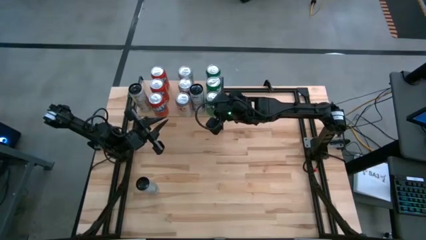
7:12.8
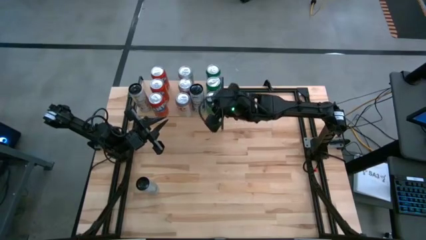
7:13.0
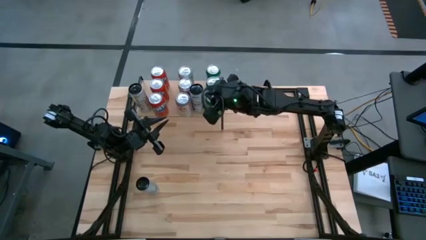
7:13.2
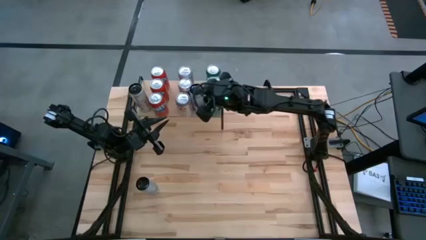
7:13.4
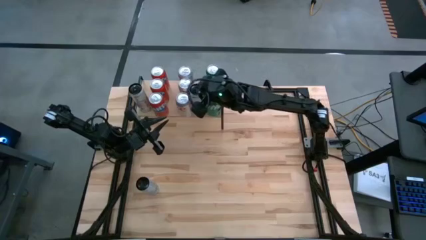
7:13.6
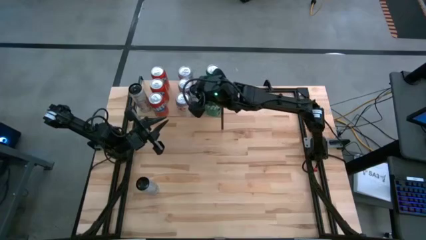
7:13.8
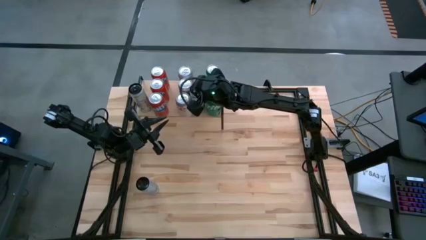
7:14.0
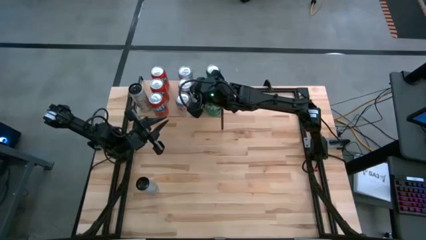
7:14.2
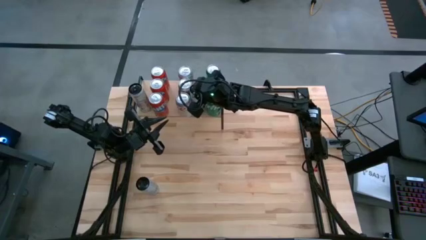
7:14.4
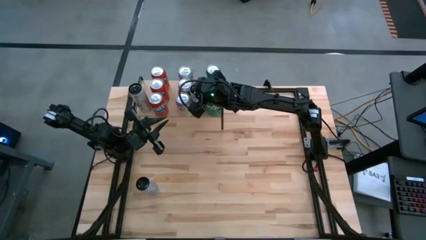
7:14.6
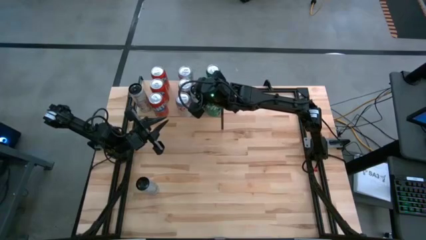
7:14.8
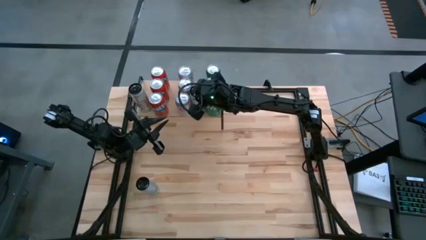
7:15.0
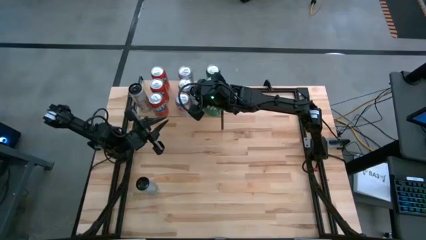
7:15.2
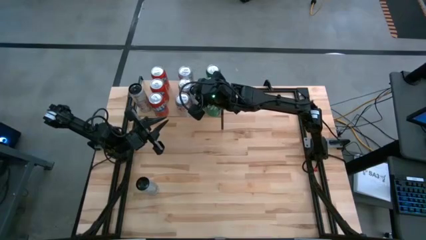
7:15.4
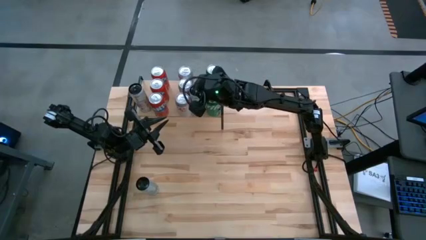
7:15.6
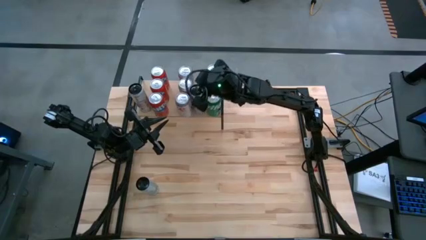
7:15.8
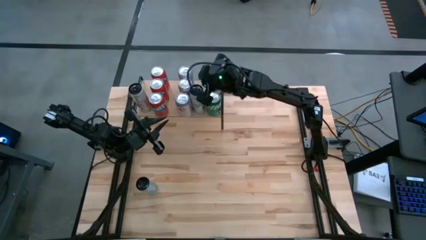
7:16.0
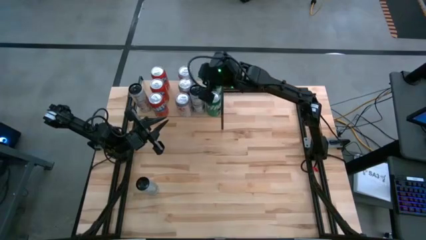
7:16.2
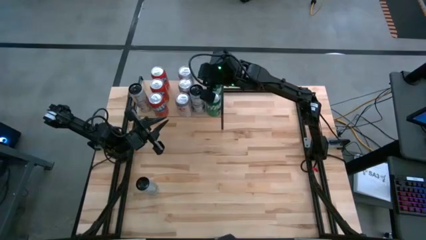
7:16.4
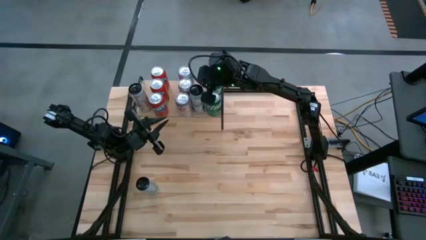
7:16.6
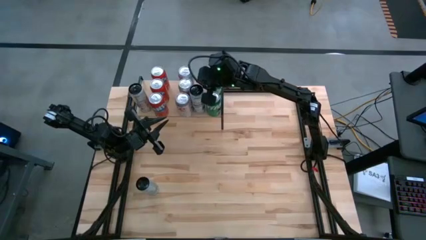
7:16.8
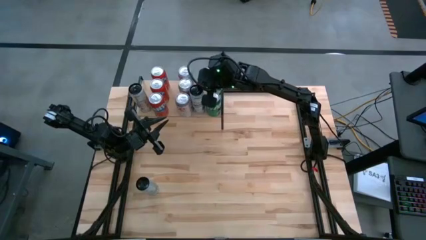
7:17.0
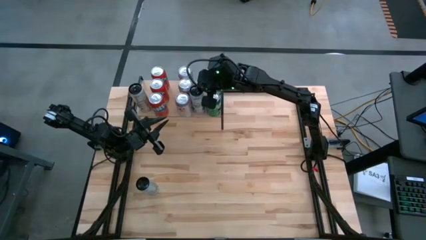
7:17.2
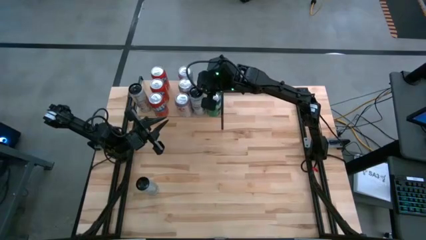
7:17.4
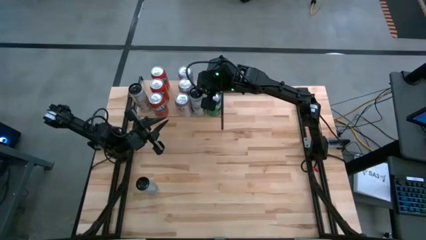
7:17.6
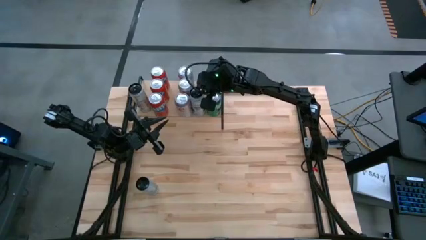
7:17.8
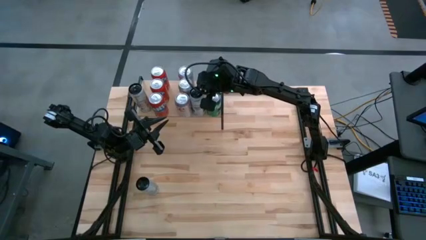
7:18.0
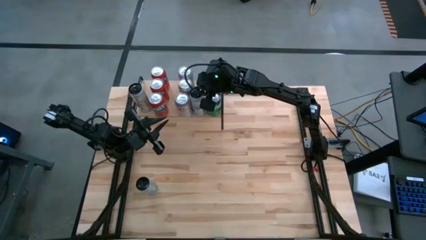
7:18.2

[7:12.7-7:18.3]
Task: Place canned beverage on shelf
Adjust the white and blue soda can on the shelf

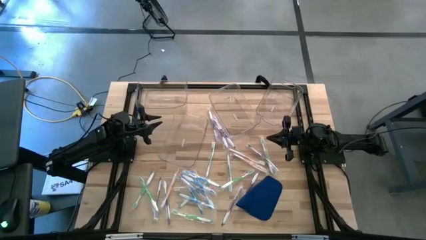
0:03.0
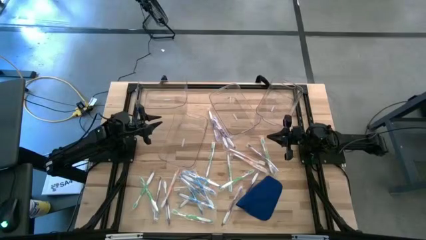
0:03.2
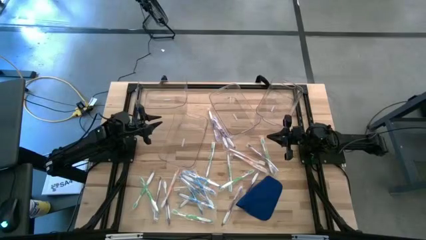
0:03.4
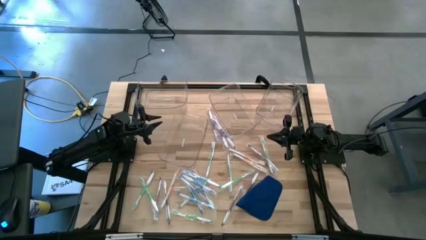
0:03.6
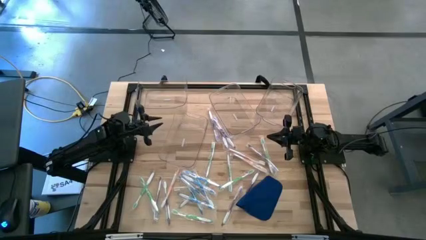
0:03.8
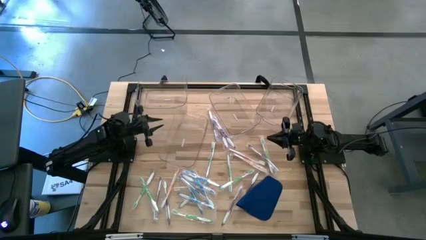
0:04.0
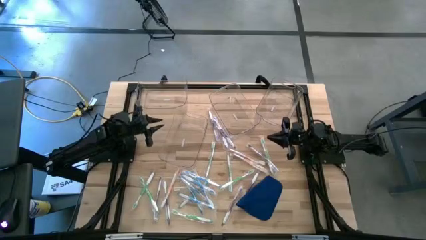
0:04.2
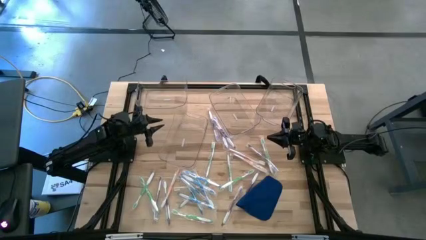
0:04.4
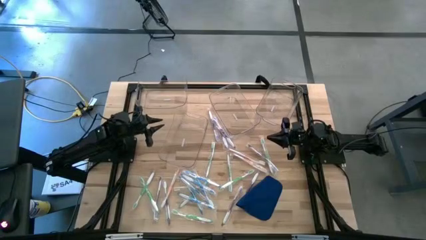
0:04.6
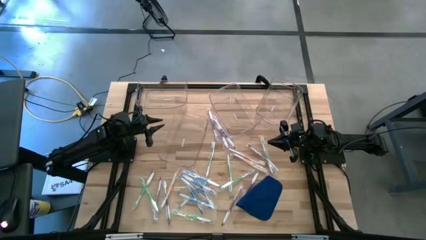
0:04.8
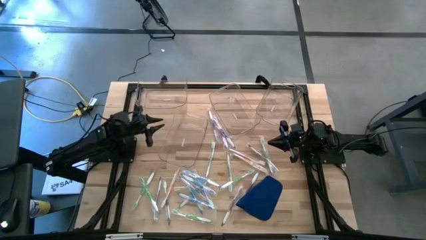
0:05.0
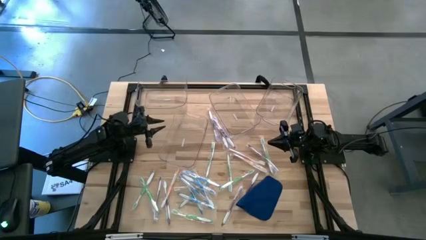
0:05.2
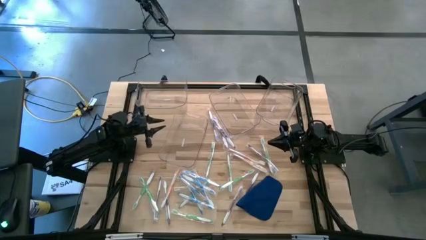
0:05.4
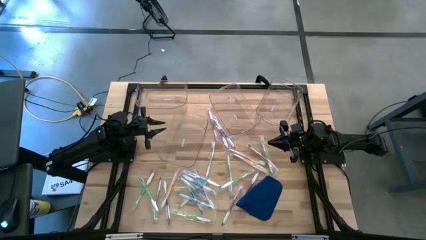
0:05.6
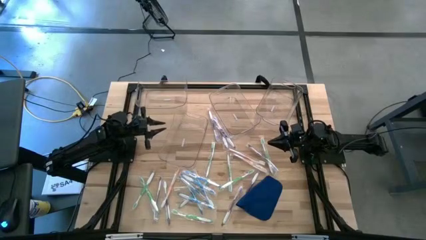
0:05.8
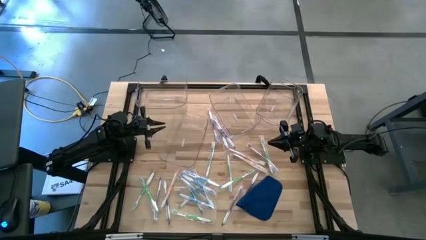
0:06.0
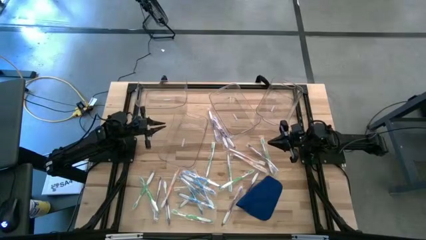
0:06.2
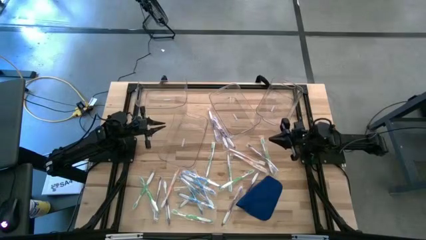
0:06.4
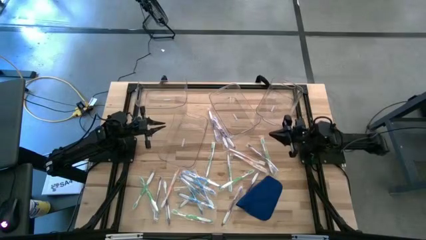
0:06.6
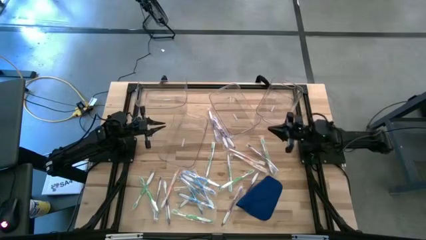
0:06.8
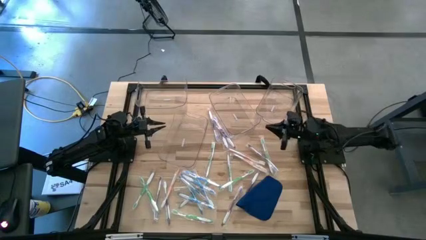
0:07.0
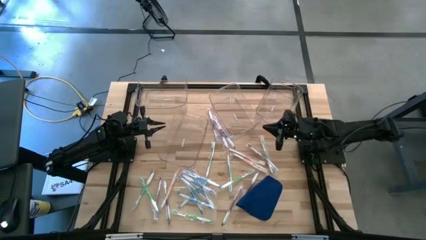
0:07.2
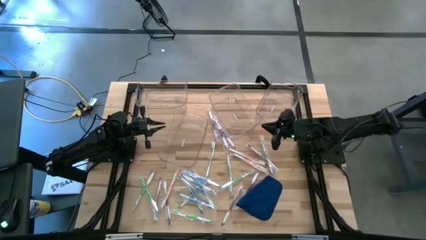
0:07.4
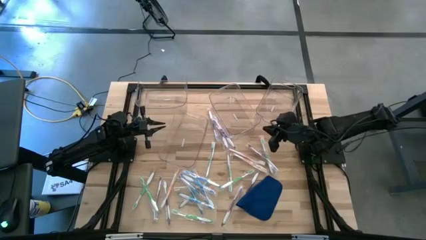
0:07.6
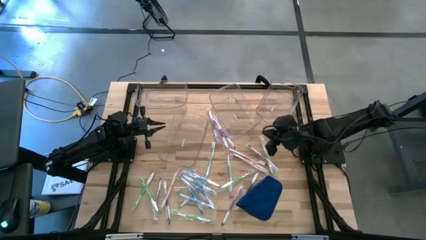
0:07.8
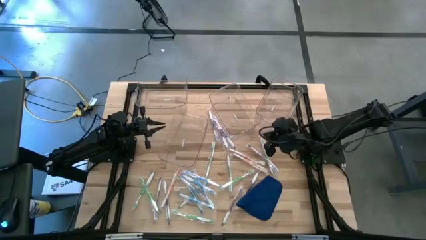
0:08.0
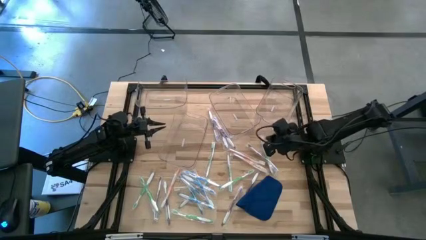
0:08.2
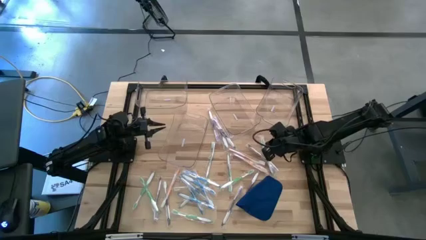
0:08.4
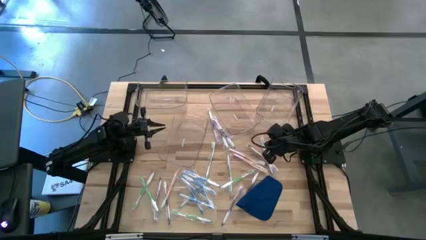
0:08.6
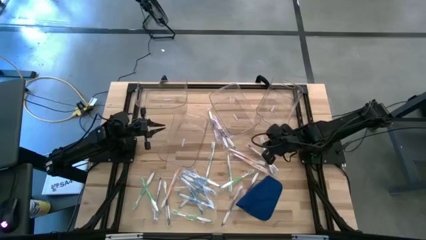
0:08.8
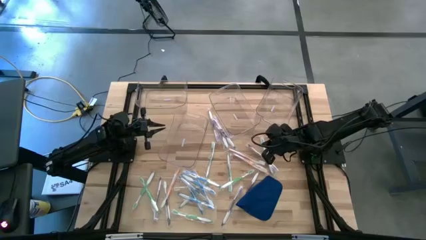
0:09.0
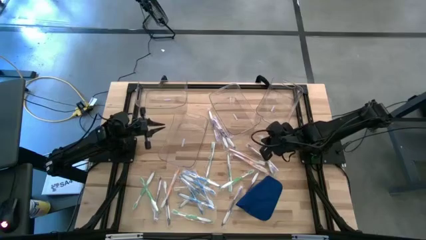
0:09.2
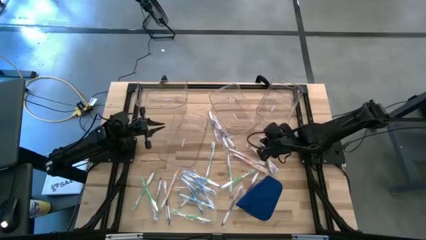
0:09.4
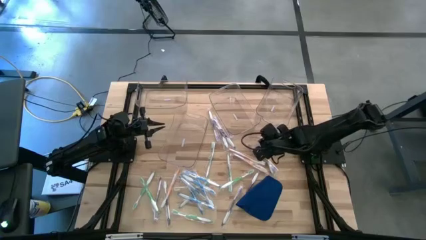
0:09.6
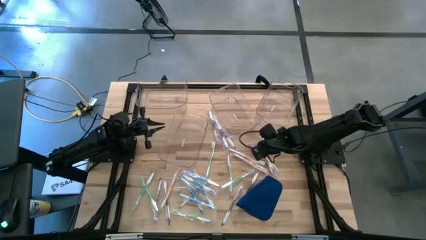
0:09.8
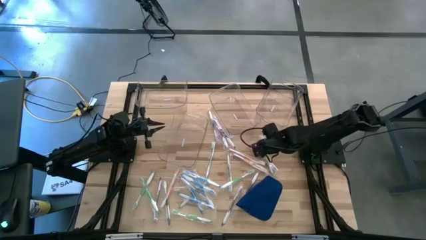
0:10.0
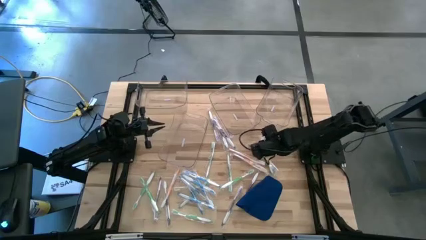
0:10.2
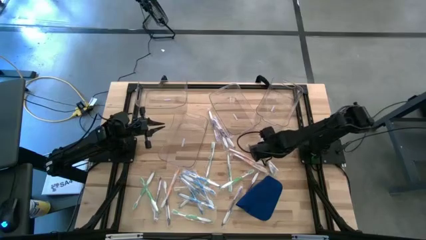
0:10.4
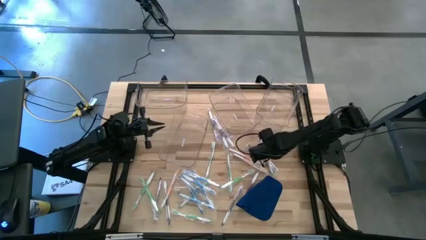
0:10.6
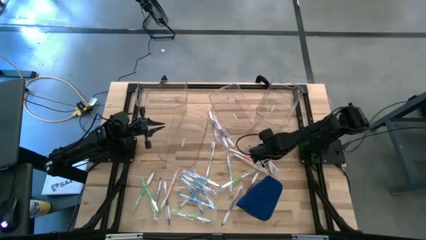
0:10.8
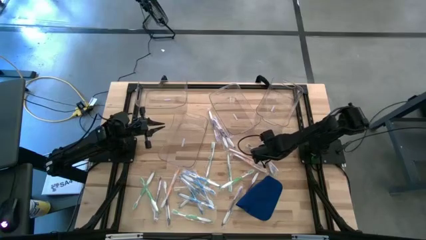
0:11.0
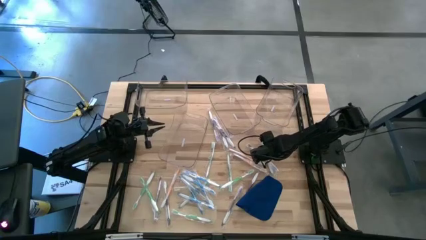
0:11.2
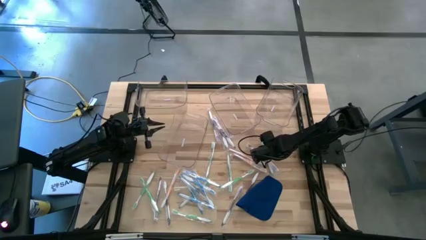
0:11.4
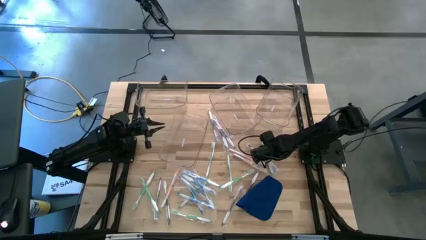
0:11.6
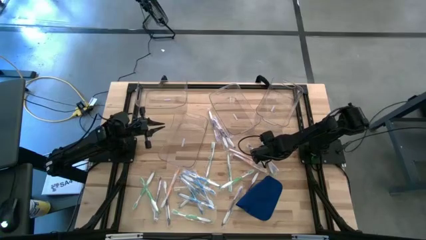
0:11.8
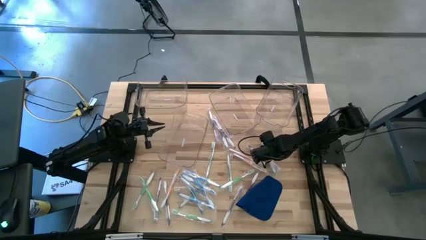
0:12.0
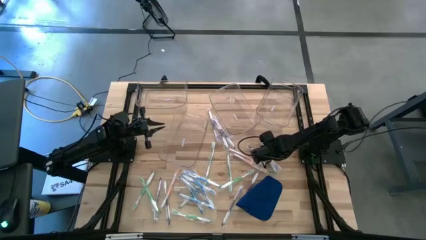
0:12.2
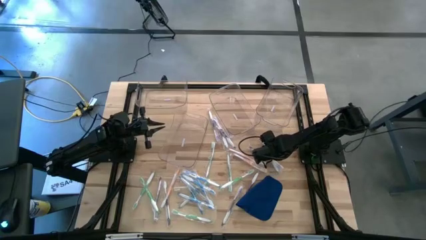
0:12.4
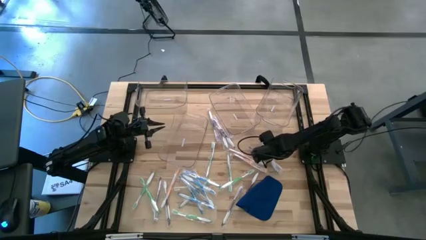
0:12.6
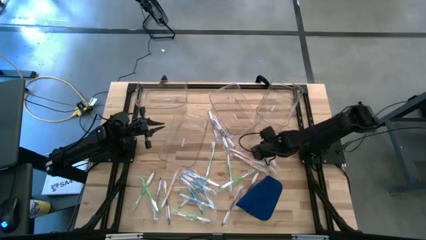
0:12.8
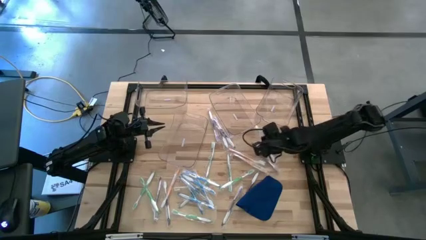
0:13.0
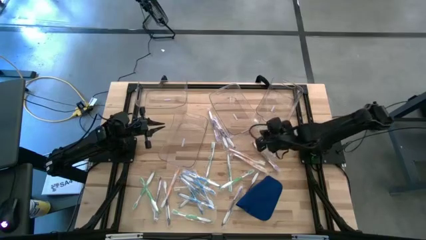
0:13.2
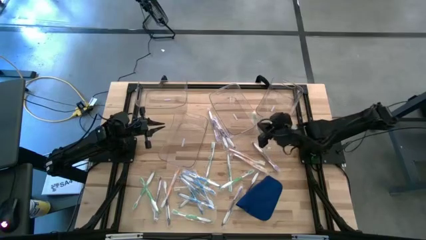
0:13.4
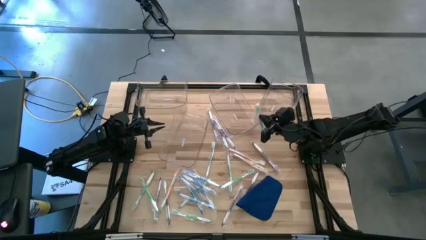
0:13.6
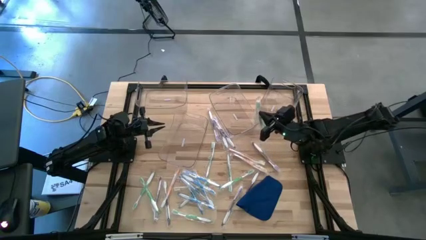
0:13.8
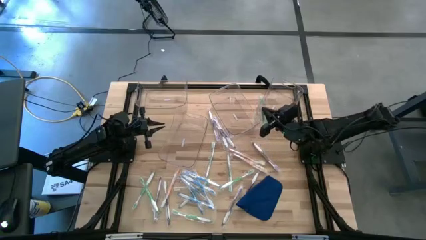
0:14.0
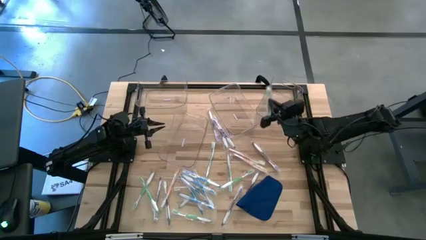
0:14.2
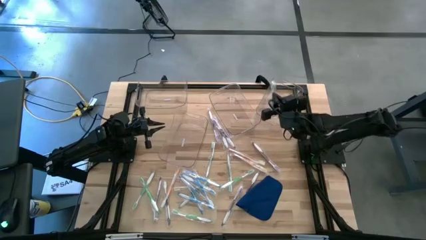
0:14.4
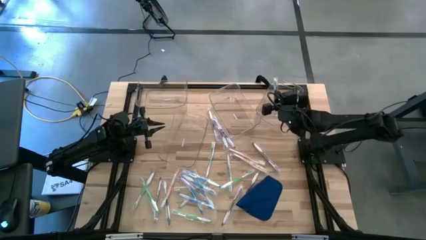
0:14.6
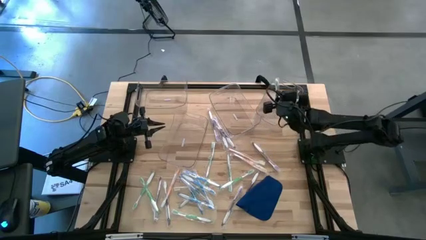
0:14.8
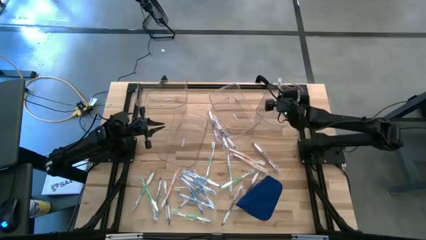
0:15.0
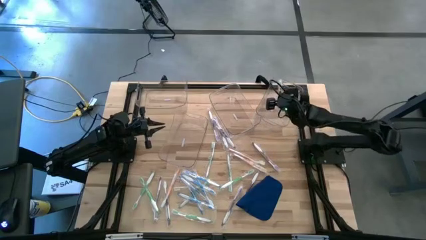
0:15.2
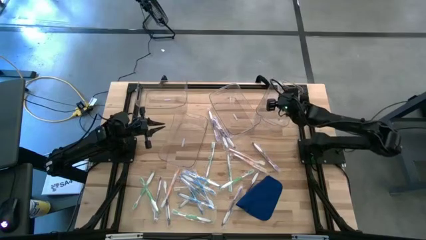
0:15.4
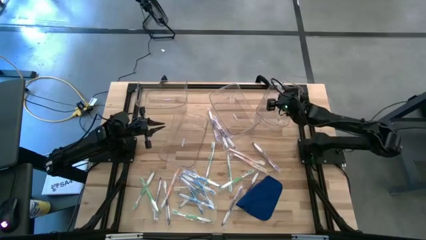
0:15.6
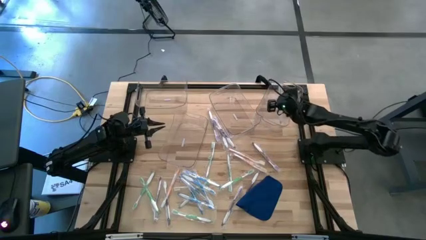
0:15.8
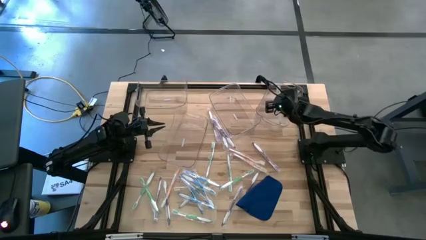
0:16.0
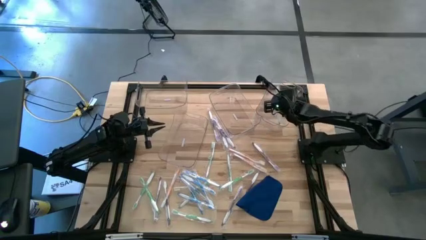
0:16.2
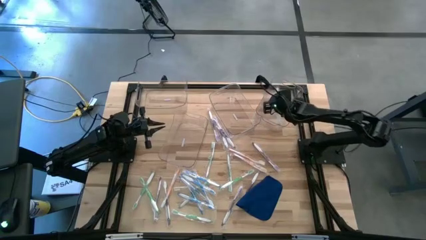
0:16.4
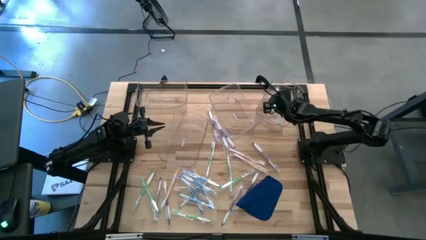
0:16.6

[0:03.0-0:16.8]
Task: Pick & Place Toothbrushes
Put the green toothbrush into the top right transparent bin
